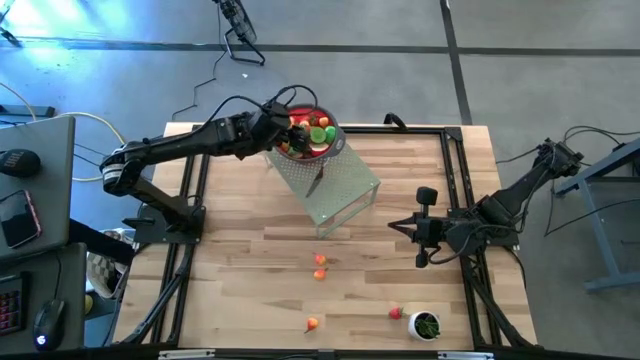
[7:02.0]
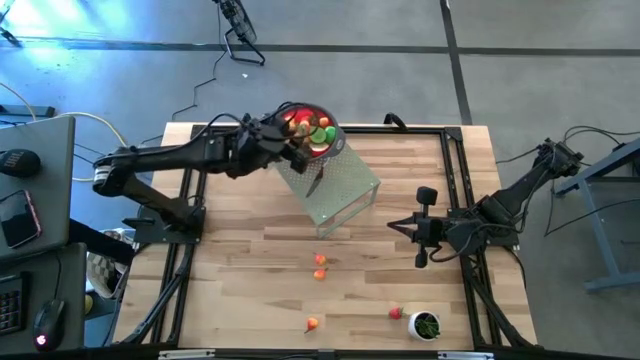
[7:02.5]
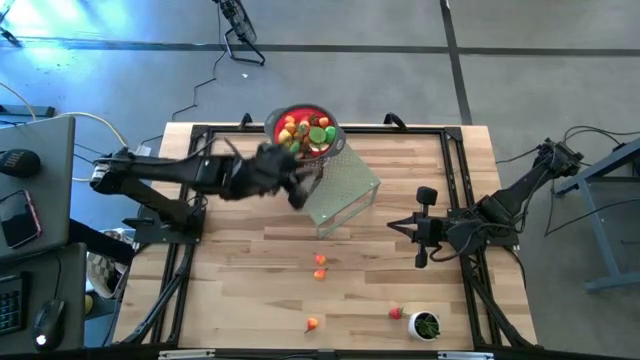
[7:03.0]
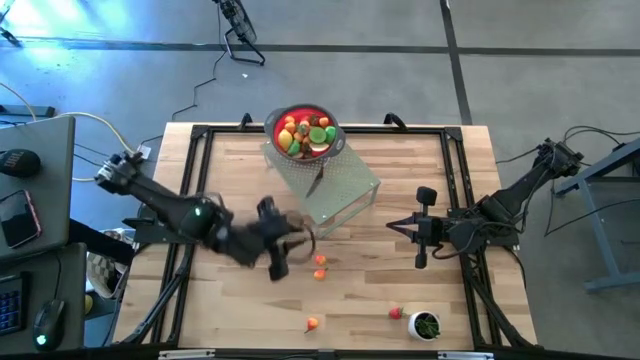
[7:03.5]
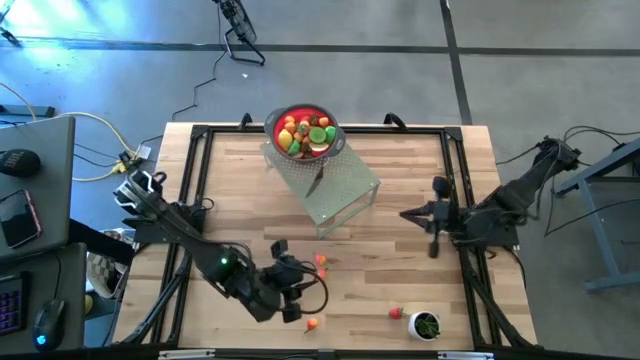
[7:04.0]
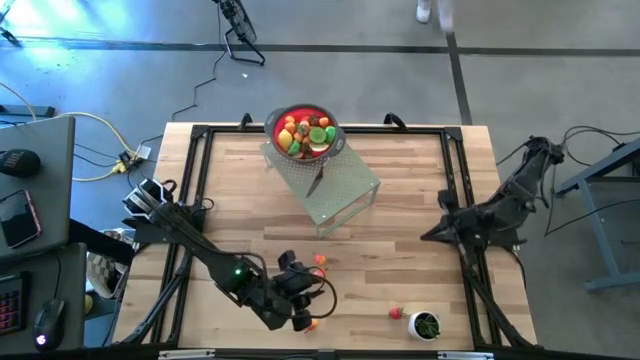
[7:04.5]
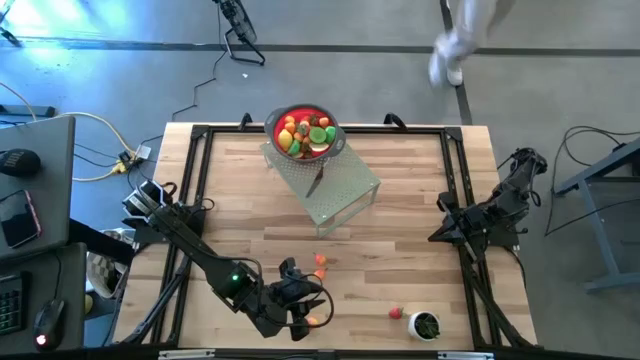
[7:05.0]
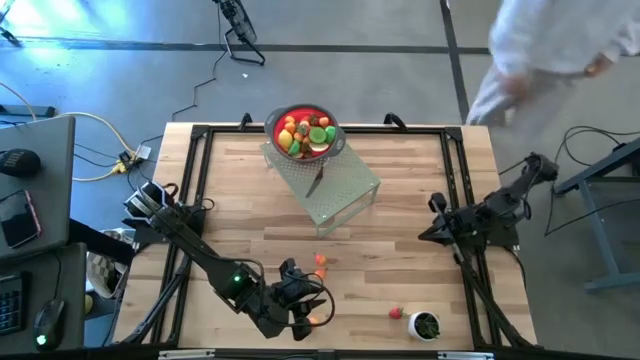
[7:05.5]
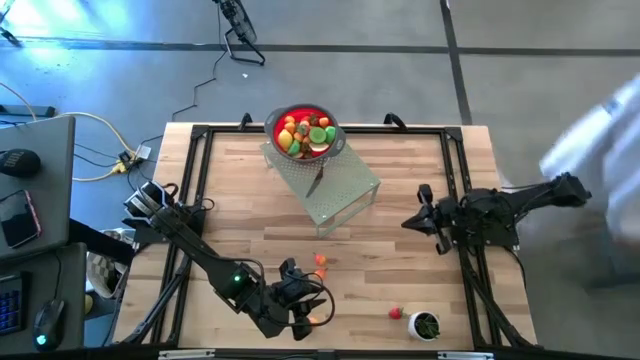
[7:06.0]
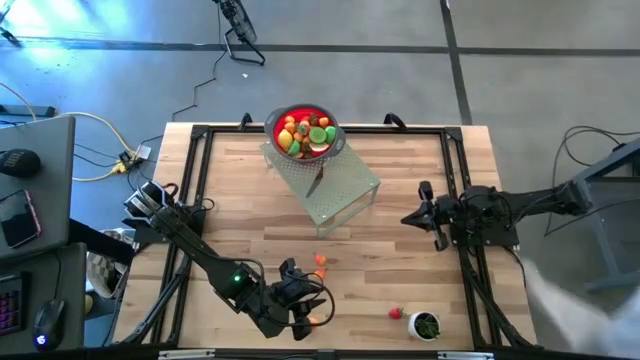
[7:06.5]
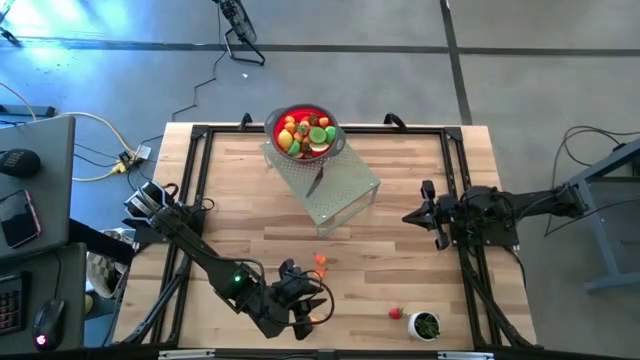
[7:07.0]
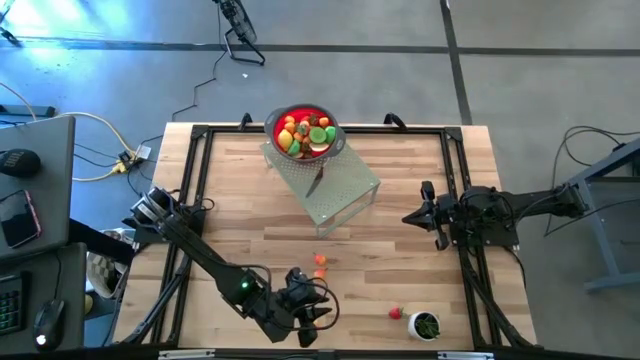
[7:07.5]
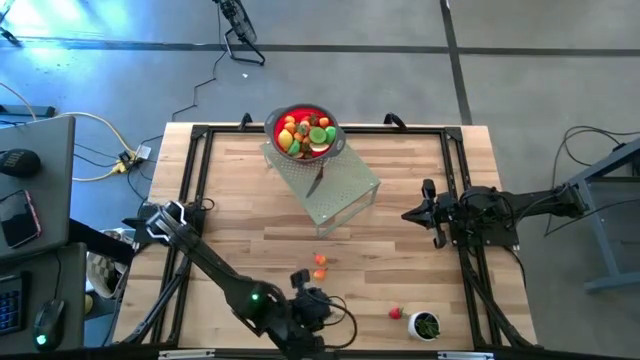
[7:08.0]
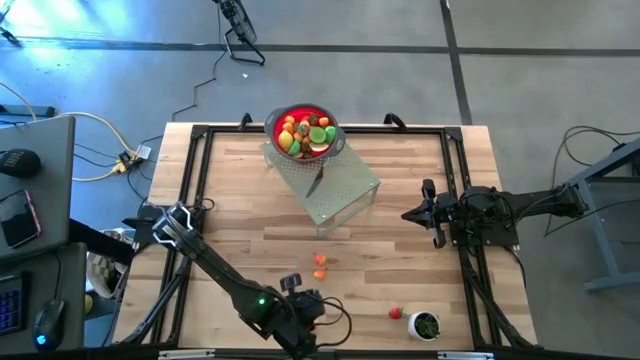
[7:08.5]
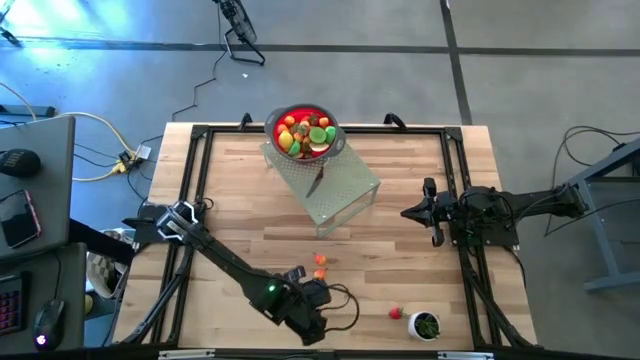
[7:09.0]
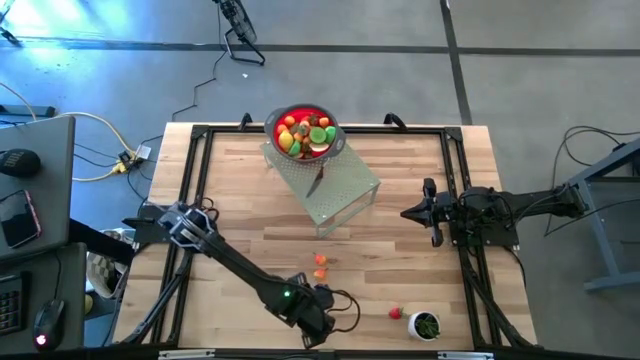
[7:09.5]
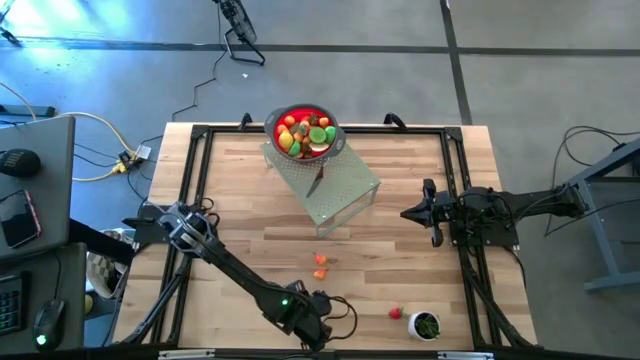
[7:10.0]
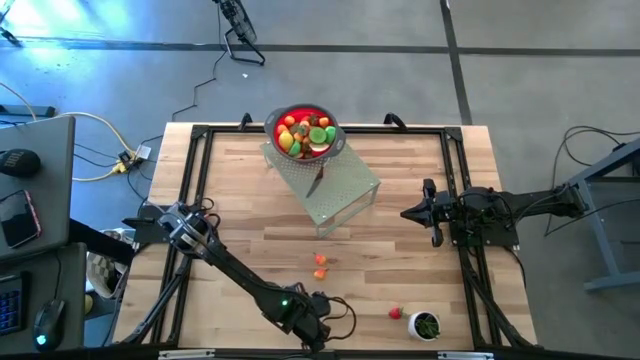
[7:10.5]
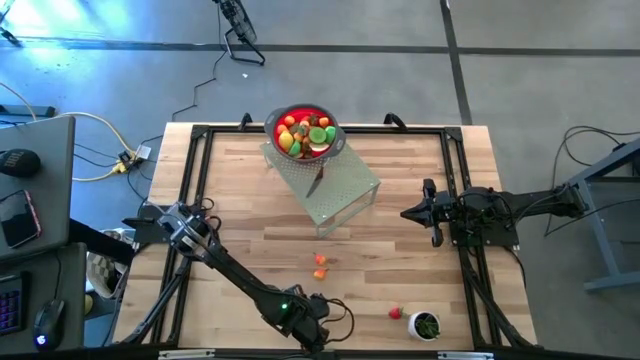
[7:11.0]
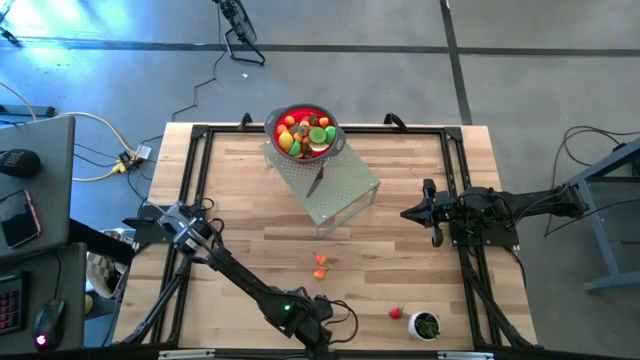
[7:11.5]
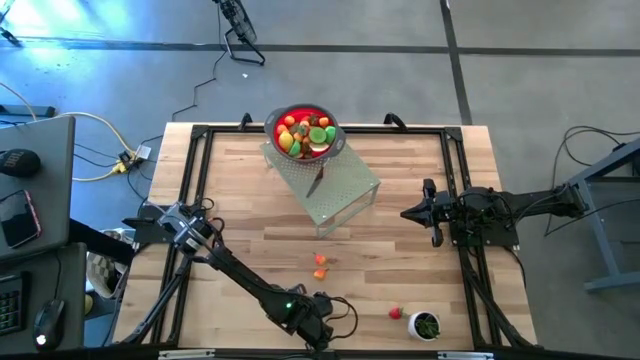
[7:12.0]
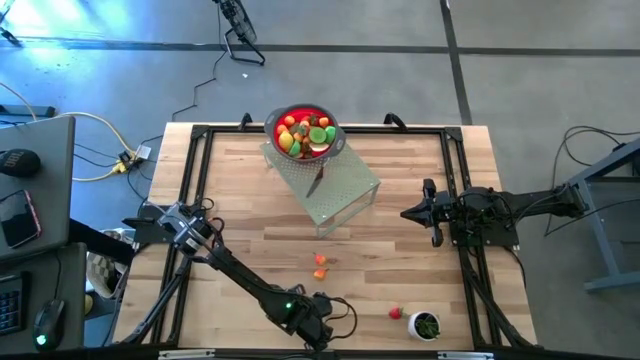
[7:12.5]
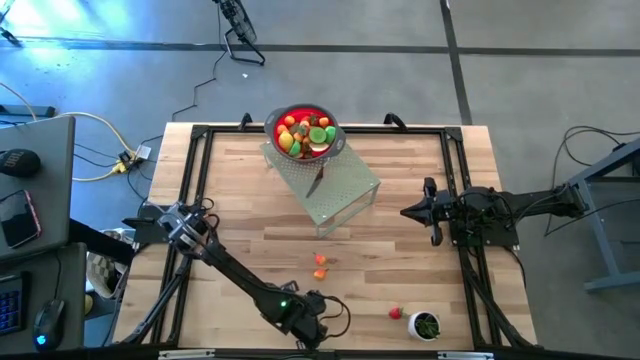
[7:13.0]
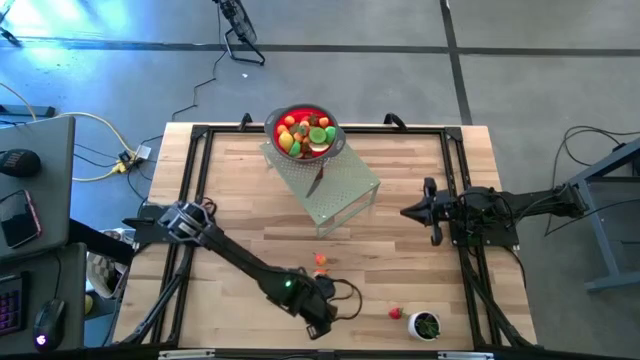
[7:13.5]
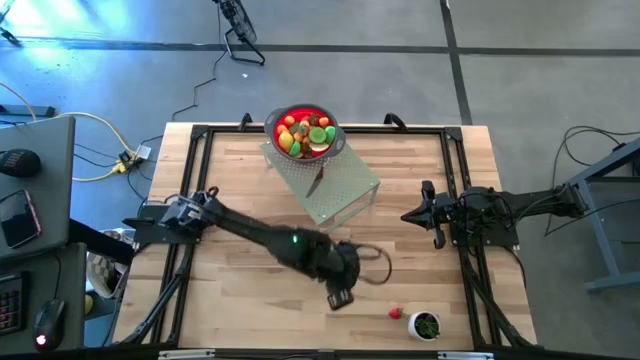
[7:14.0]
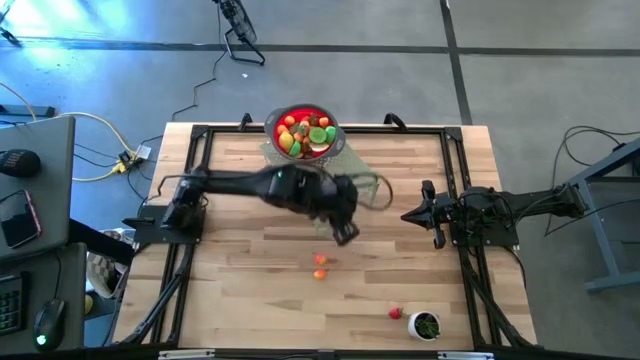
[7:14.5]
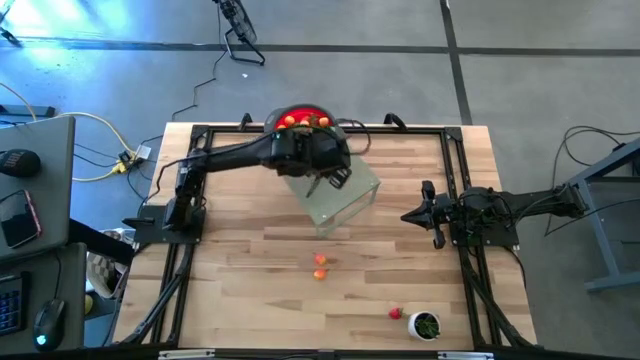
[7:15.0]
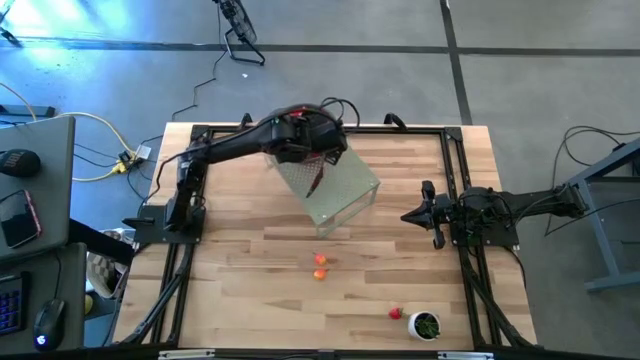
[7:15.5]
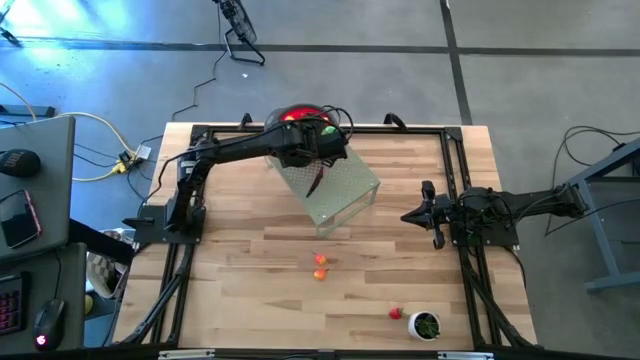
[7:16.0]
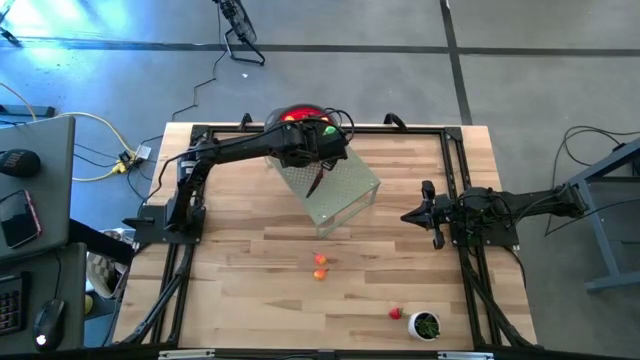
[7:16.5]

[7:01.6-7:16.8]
Task: Pick & Place Fruit
Put the orange pear into the red strainer on the shelf

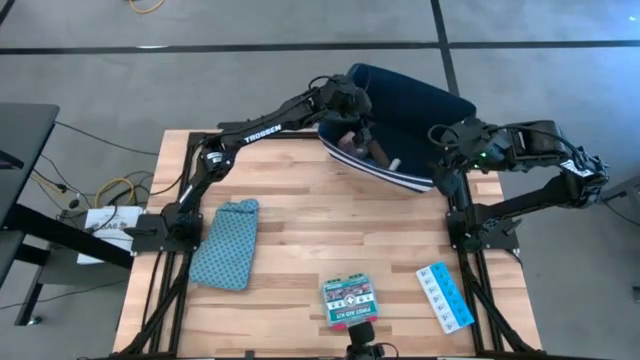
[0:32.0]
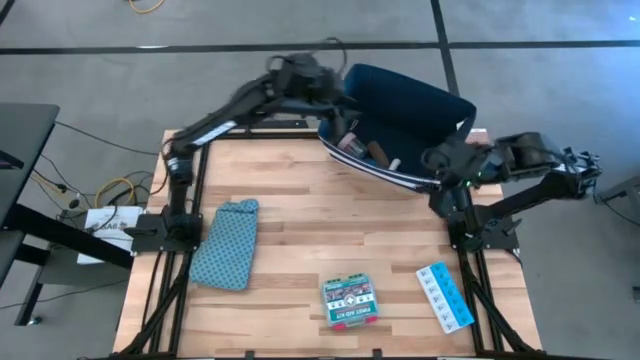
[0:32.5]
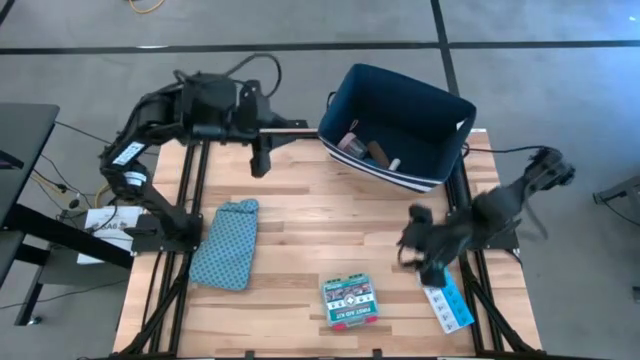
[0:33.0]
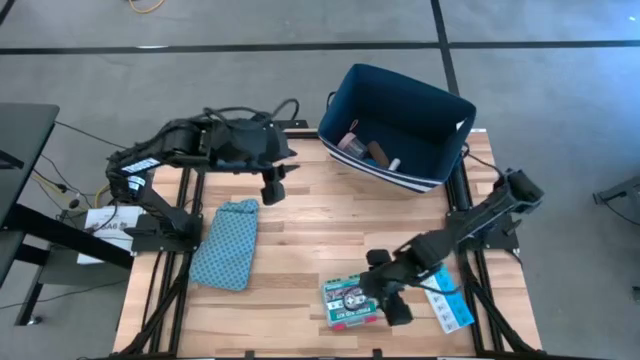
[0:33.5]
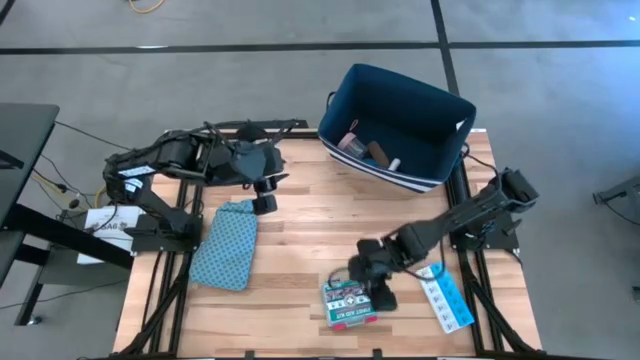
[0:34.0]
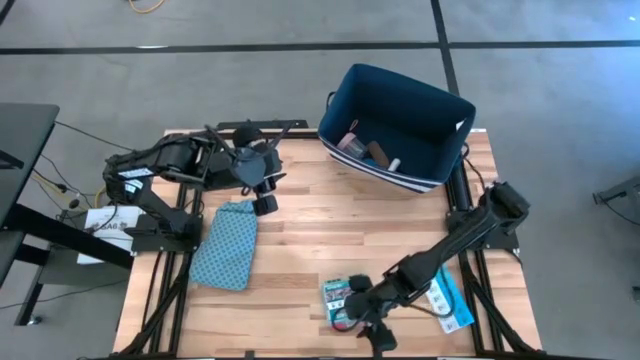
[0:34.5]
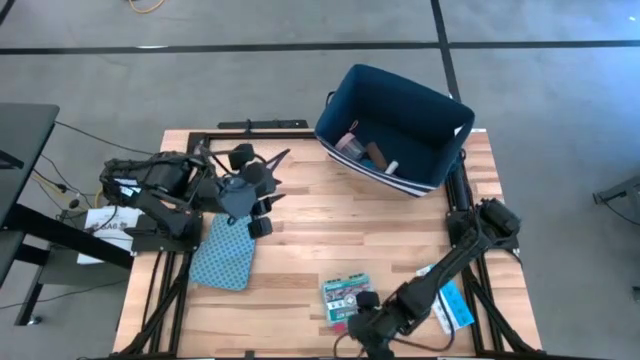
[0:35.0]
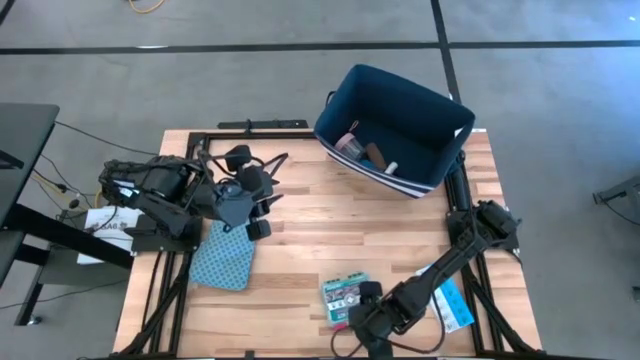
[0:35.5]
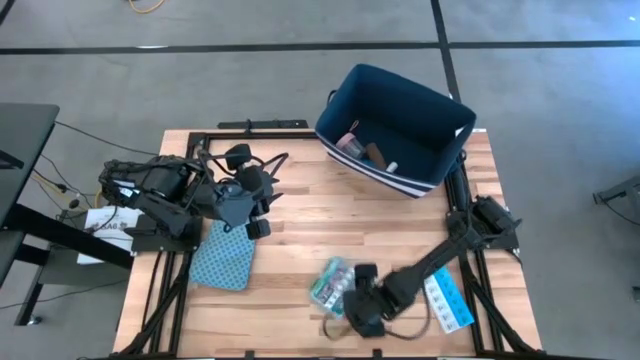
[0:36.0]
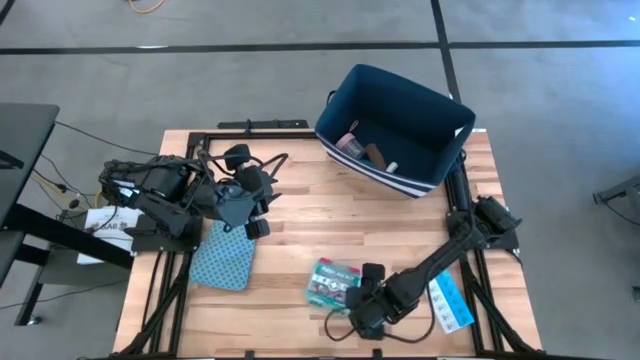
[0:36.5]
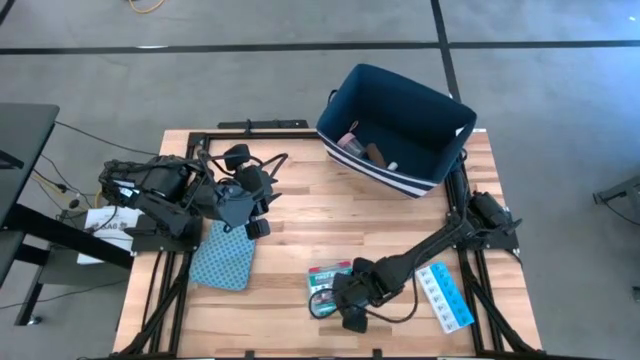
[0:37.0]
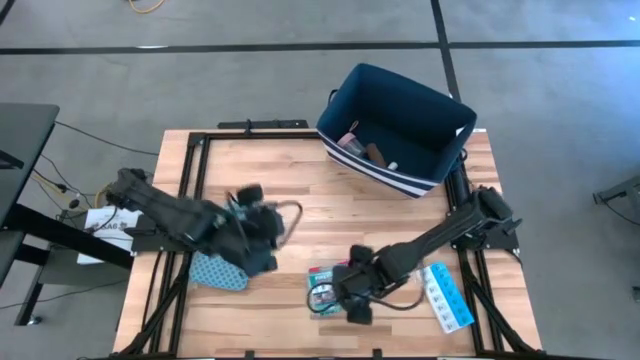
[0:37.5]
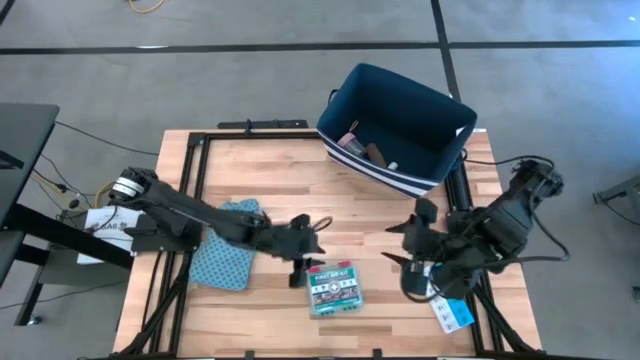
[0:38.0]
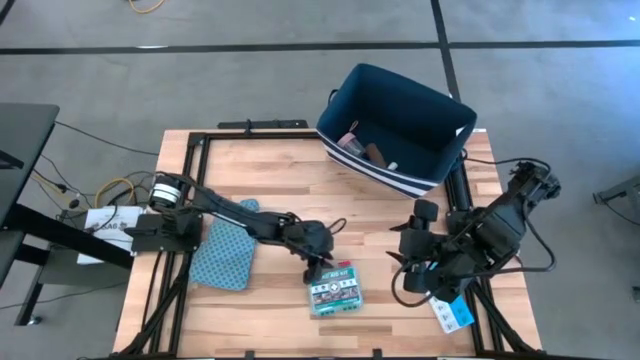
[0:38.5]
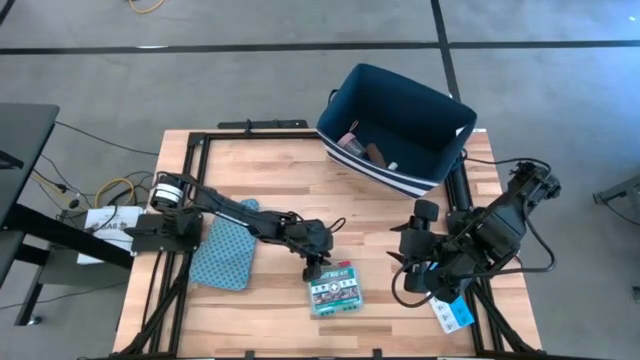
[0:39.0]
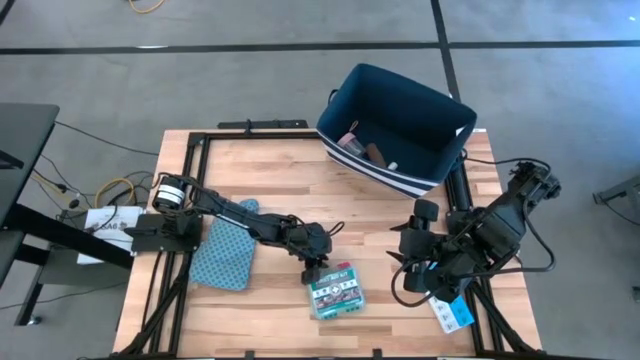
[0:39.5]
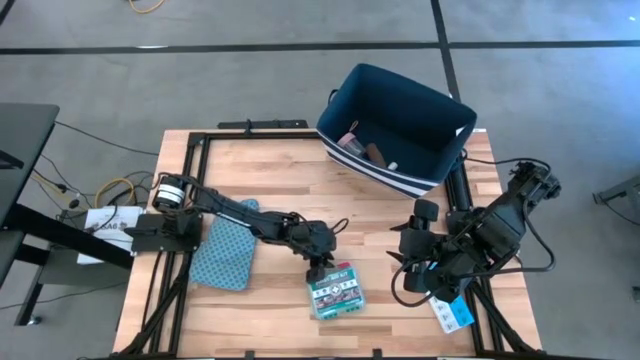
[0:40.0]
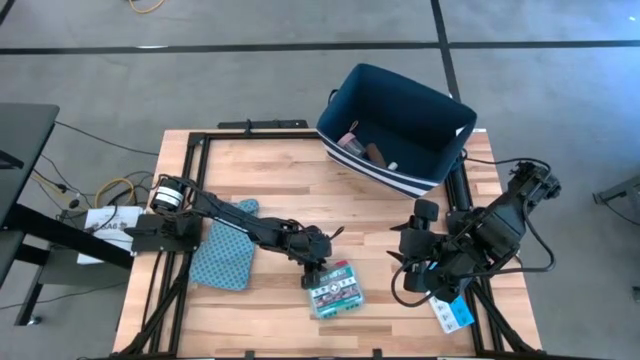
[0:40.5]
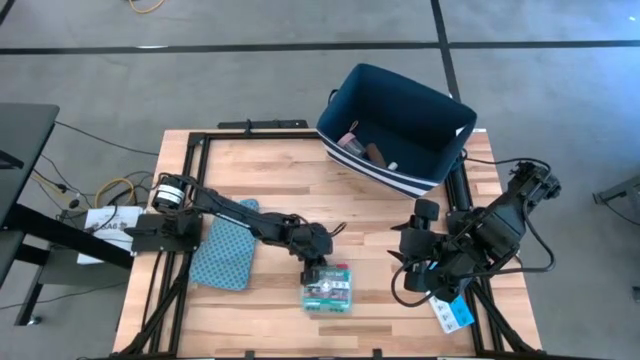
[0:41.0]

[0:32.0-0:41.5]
Task: Pick & place medical supplies in basket/bin
Put the blue first aid kit into the blue organizer bin
